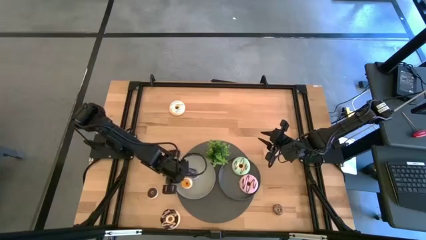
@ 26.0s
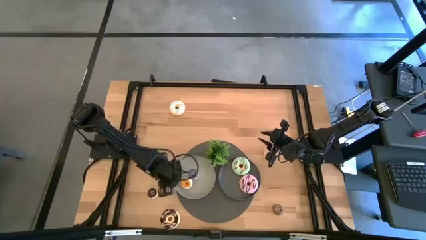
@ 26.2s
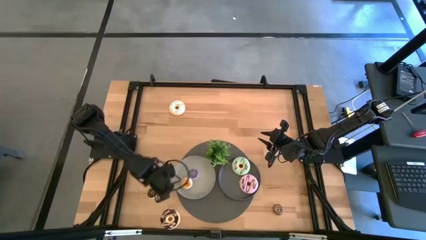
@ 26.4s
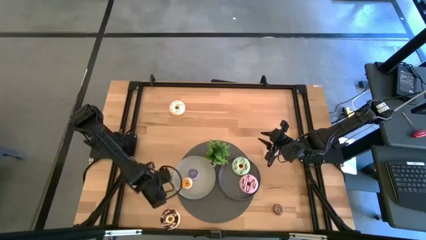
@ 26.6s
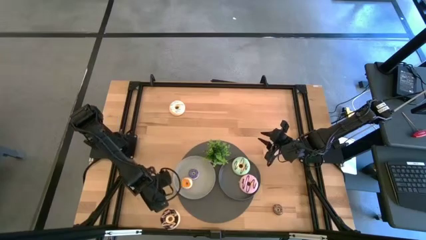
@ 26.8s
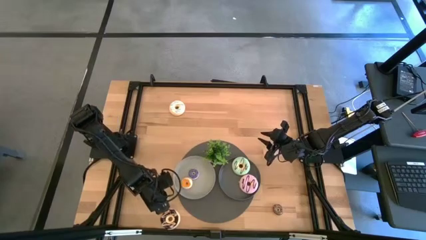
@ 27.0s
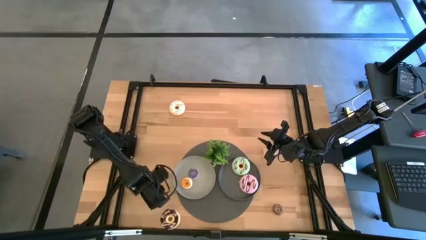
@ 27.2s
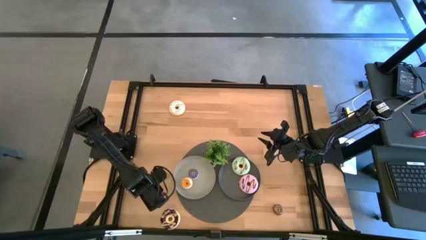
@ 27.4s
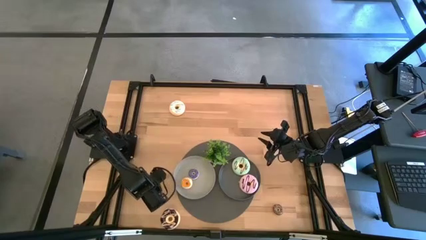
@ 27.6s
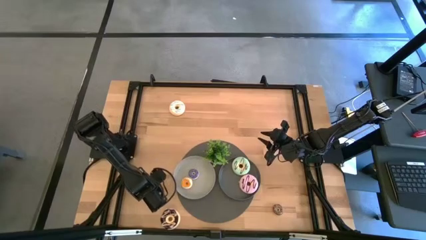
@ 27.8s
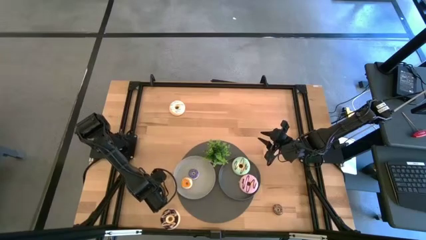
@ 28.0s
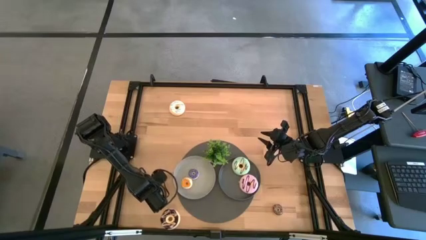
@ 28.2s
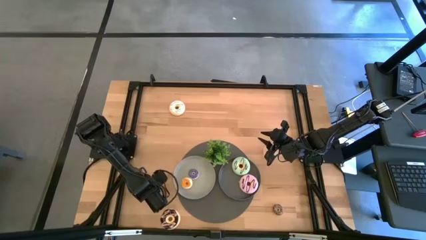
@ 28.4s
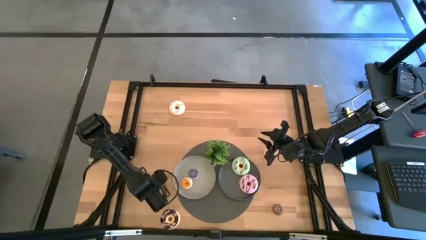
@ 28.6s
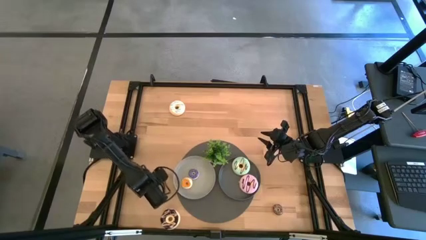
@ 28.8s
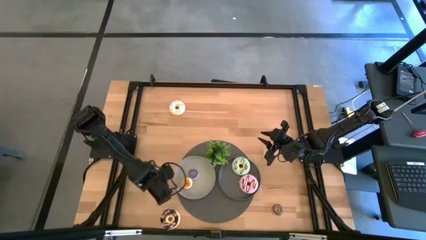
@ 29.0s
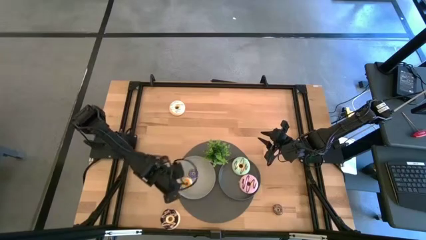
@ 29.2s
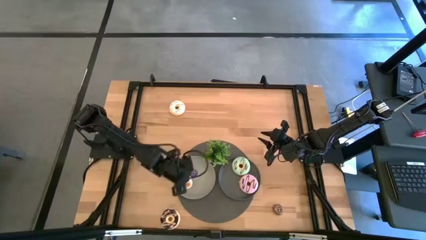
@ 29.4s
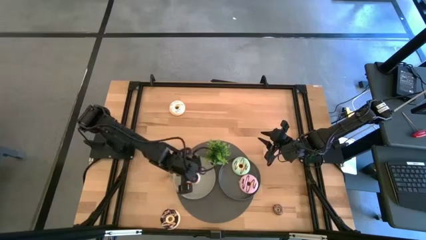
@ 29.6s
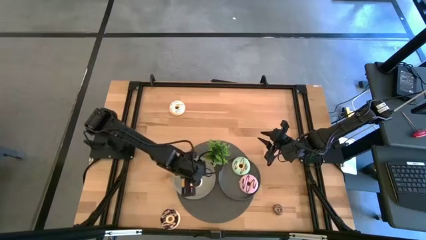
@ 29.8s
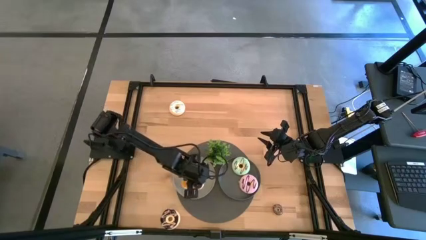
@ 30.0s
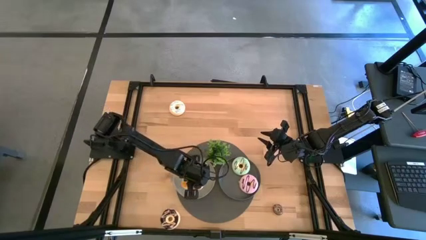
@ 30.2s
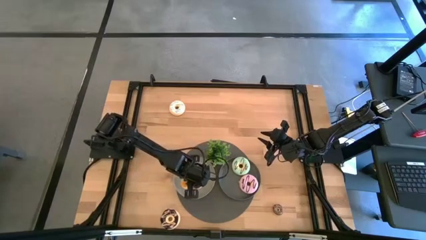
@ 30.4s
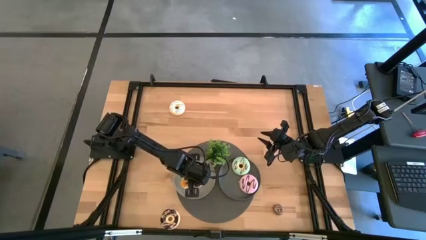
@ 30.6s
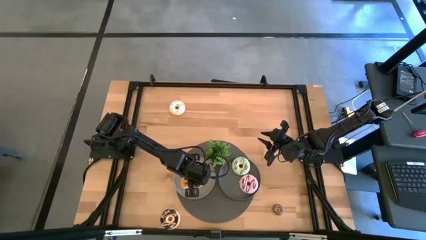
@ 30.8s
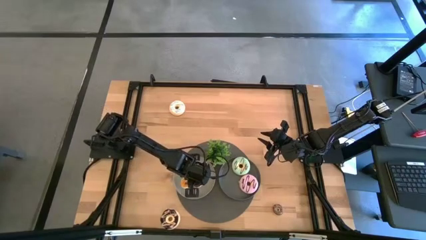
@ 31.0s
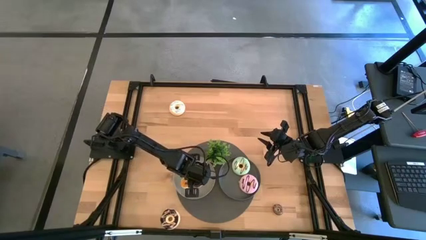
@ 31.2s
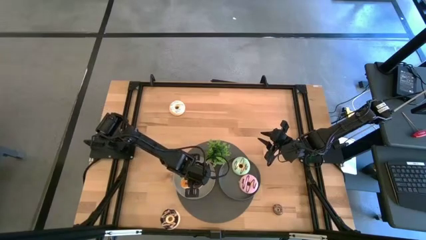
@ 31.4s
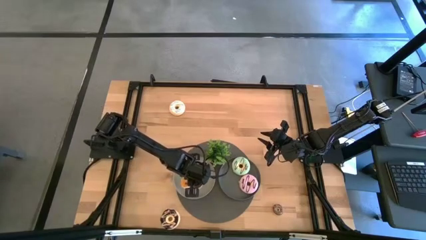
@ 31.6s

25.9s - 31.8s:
Task: Pick & Place donuts
Put the small black donut on the gray plate

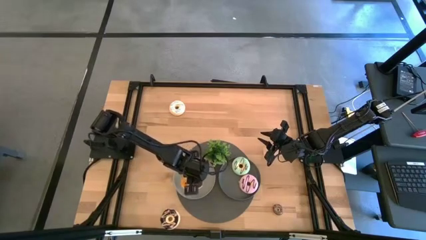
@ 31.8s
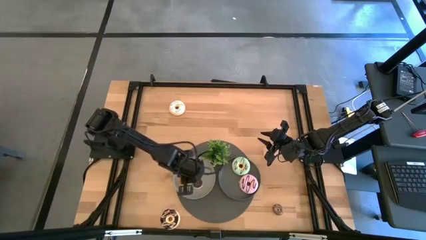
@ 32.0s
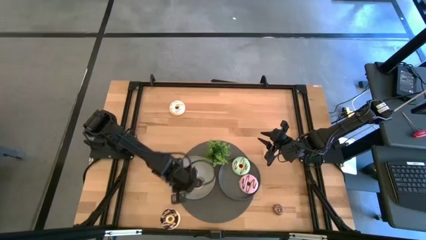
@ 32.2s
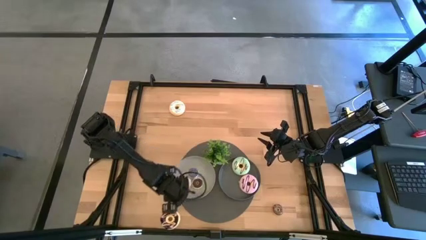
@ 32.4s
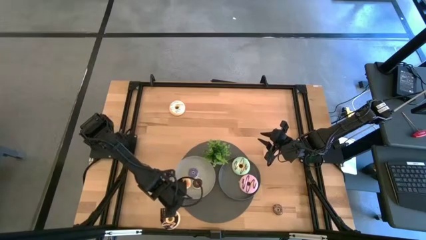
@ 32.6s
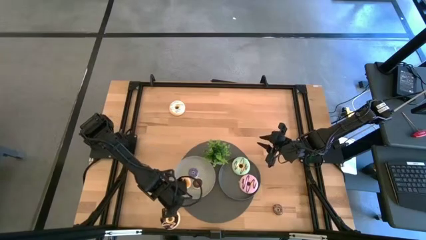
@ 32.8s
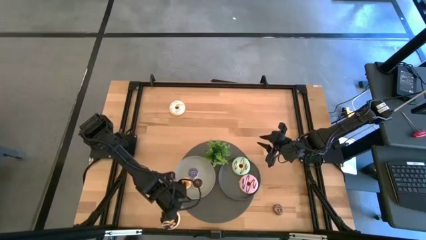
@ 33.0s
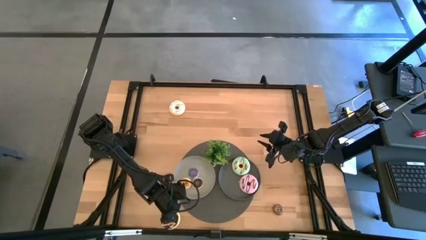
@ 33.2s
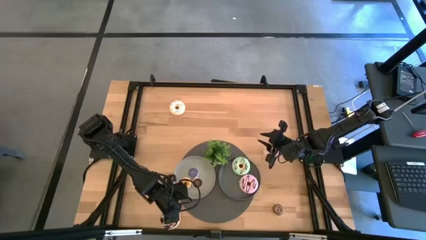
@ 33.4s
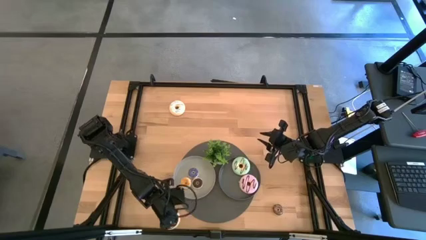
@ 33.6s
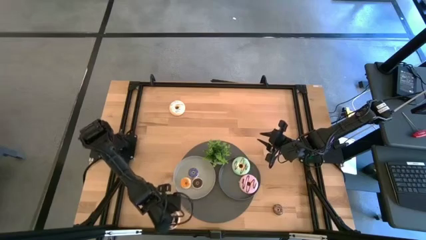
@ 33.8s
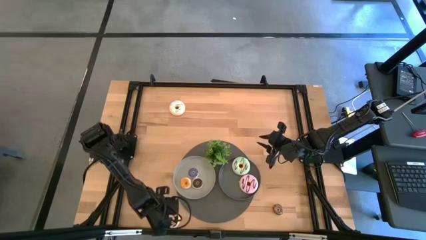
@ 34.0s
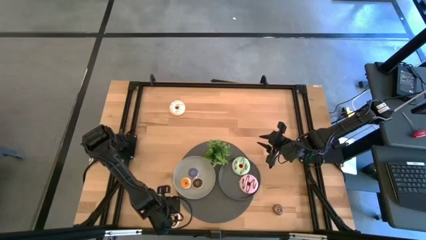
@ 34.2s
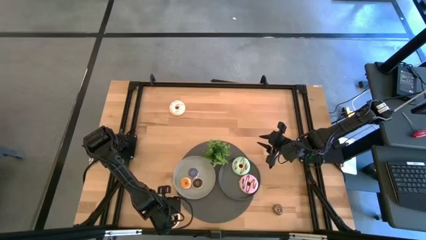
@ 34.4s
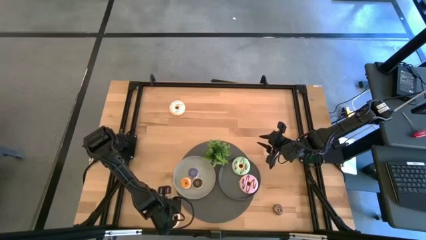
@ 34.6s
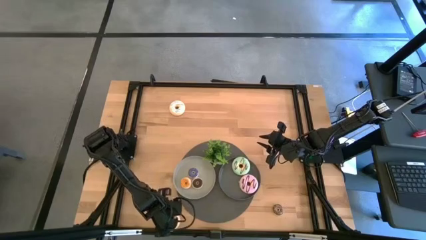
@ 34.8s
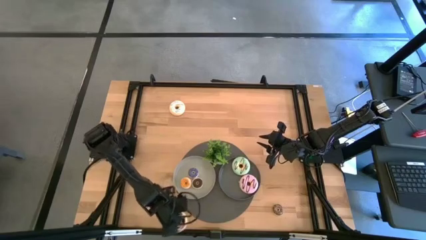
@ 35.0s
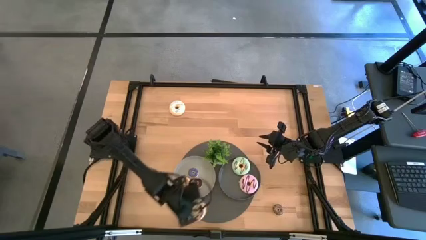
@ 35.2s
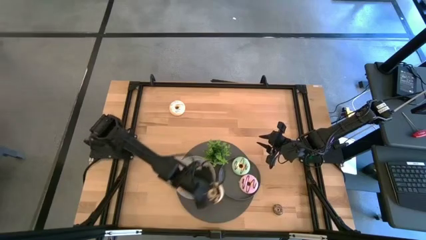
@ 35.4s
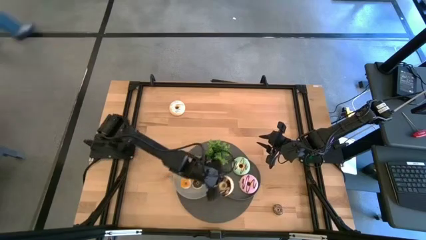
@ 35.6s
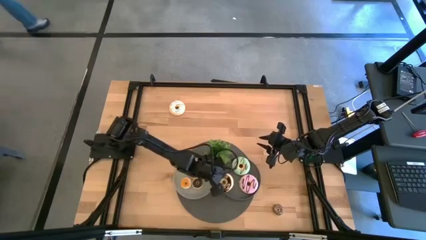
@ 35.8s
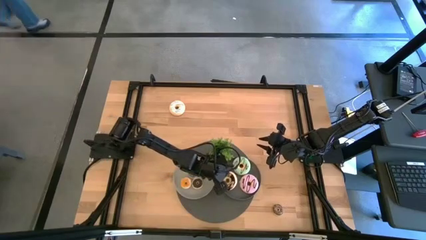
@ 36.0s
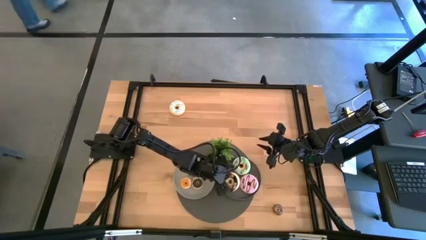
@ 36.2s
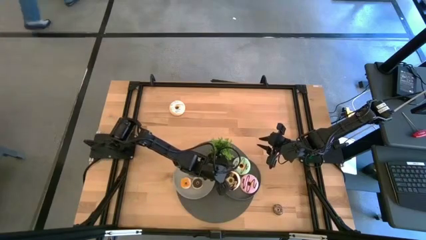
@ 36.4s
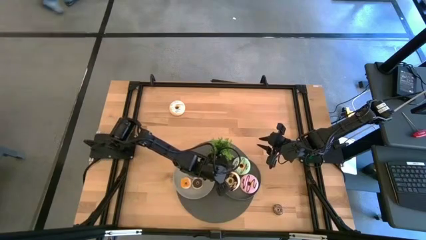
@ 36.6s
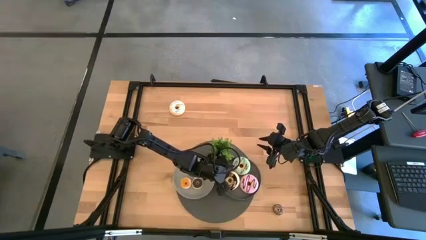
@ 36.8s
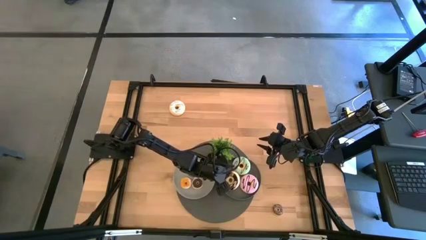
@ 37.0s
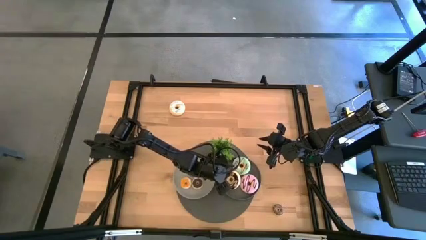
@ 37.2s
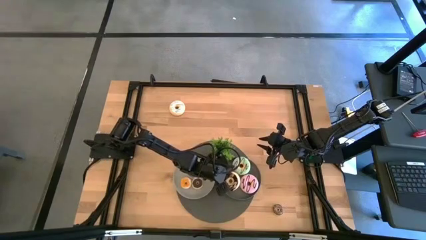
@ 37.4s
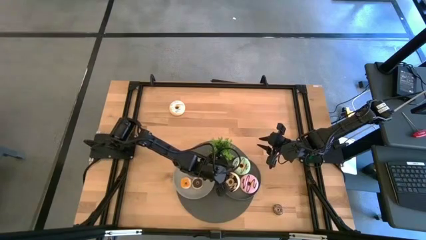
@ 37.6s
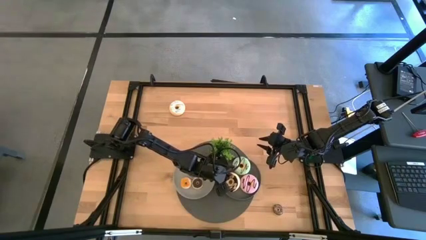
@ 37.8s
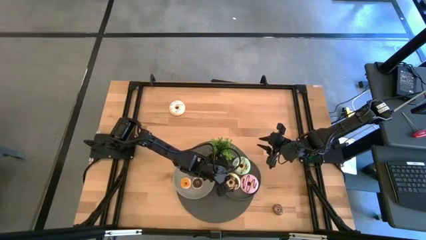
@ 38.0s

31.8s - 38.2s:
Put the large black donut on the black plate

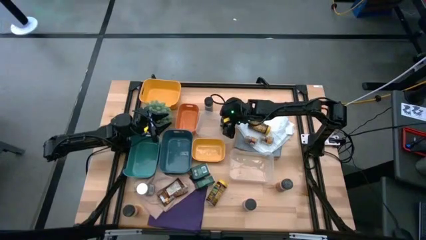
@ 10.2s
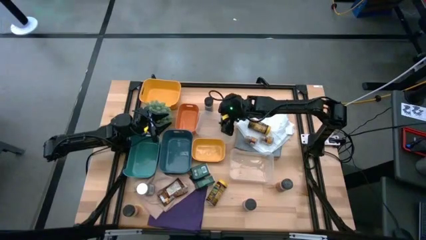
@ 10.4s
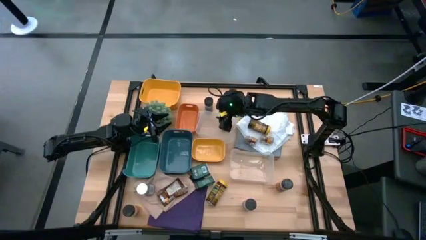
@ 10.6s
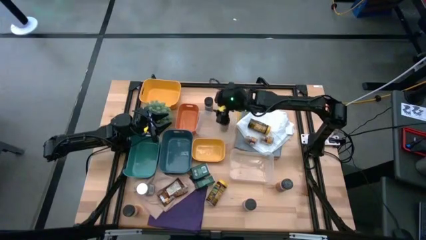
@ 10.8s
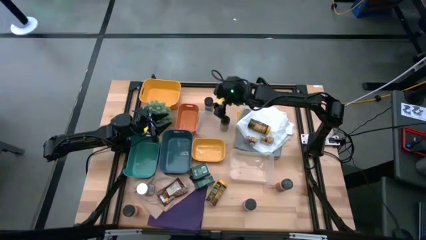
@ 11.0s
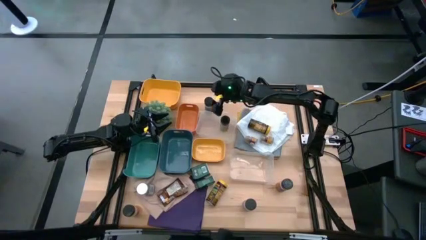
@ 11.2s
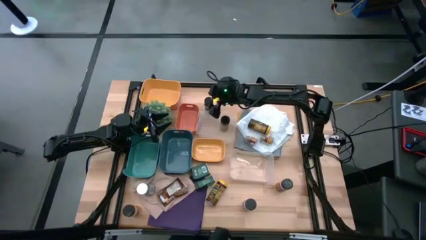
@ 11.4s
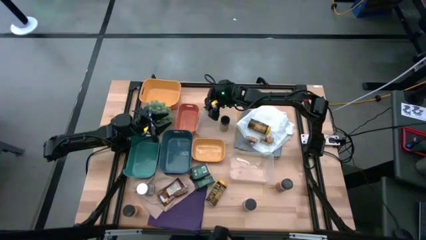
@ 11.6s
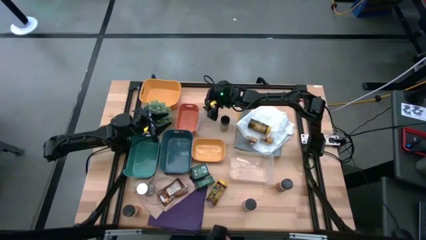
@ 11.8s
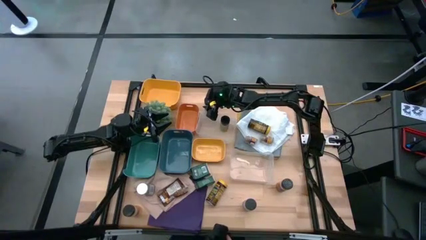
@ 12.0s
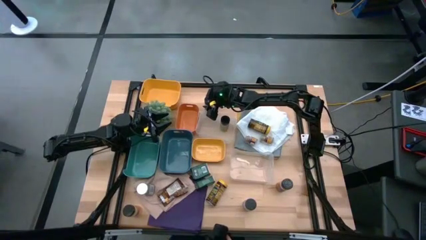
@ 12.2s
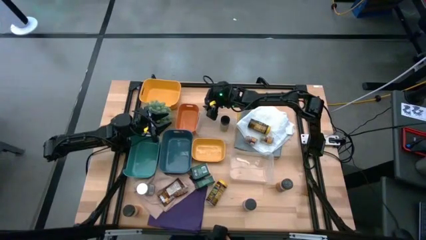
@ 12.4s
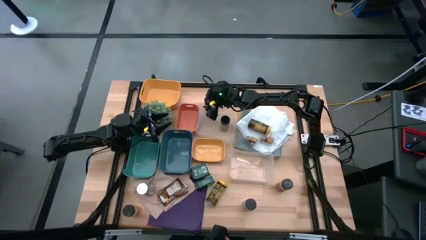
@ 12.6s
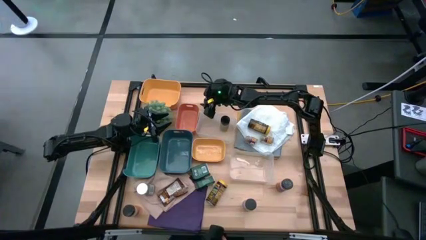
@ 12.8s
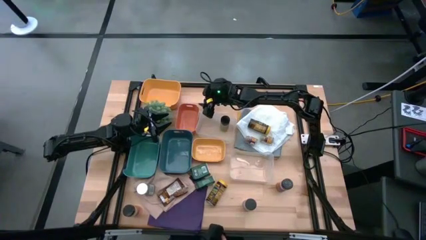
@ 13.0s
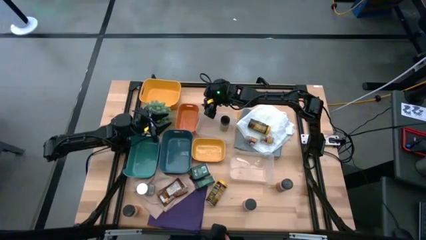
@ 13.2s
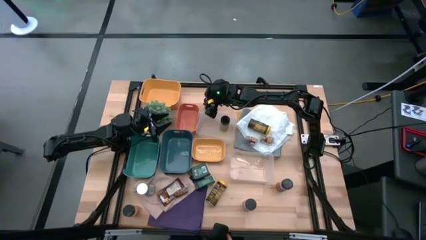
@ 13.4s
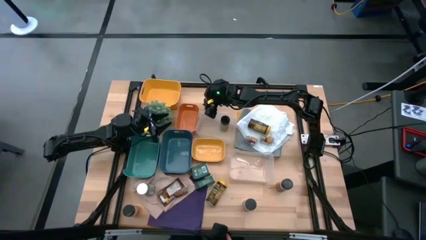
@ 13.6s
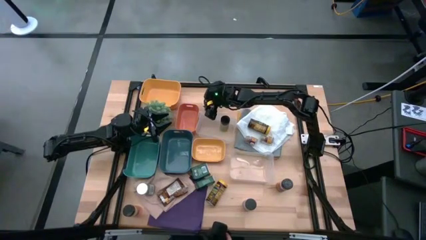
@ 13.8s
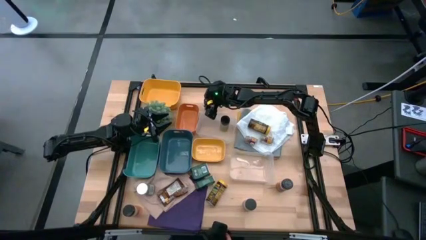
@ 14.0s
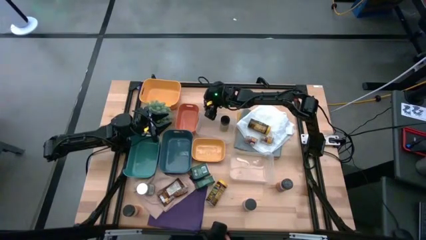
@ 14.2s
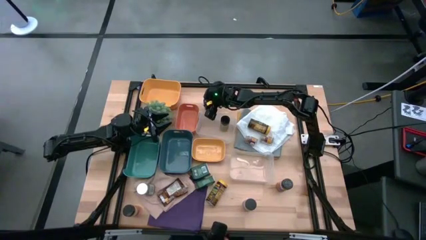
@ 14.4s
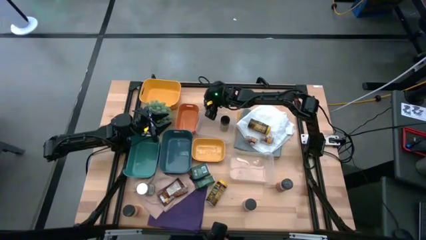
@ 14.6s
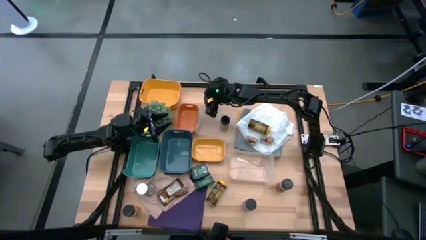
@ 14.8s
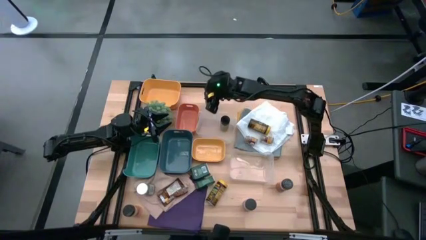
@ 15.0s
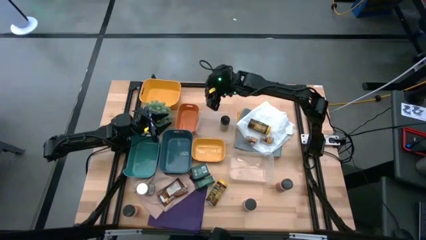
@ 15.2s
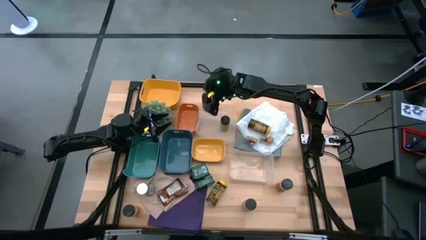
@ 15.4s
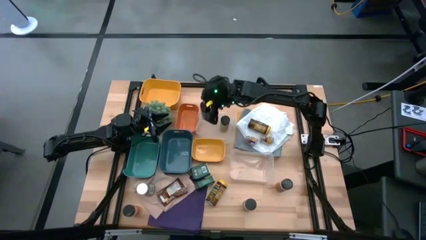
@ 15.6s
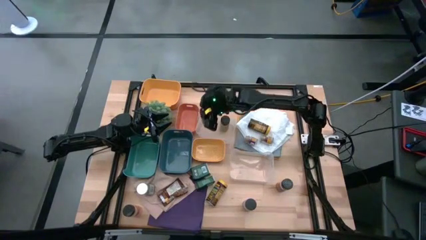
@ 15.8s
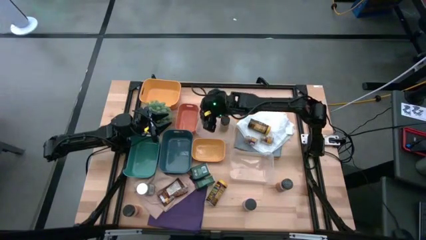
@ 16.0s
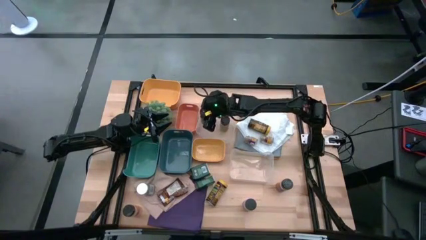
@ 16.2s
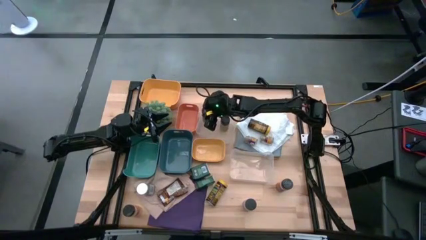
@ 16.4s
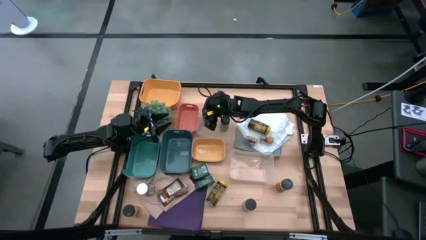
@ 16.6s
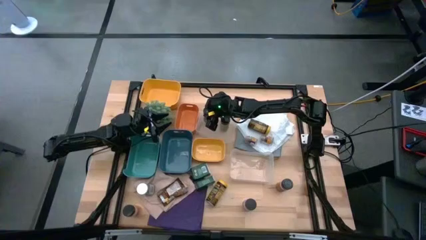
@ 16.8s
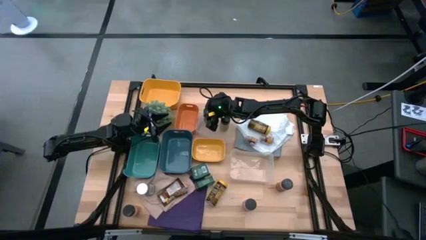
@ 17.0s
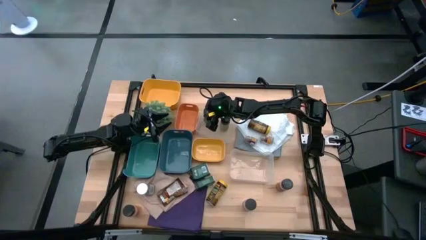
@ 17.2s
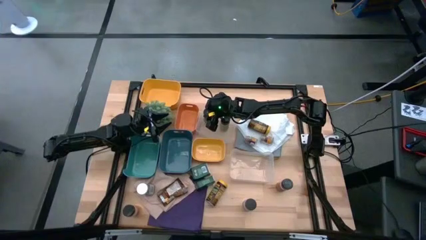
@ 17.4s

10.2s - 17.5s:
Task: Sort spices by type
Put the top black seasoning bottle into the top transparent bin
